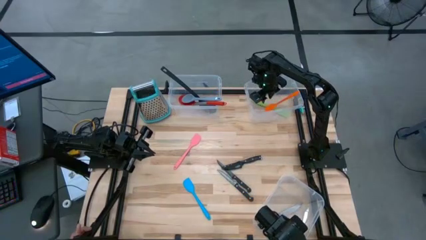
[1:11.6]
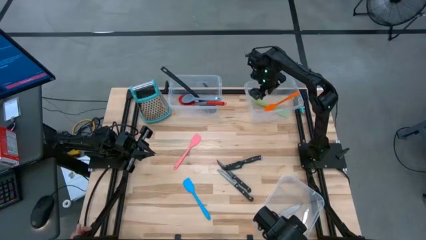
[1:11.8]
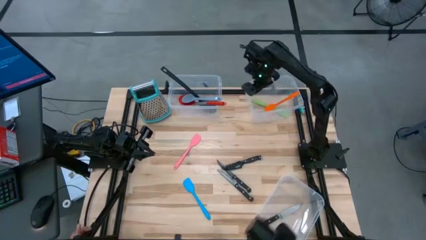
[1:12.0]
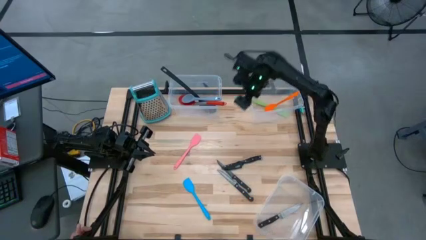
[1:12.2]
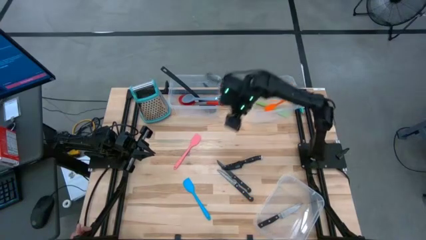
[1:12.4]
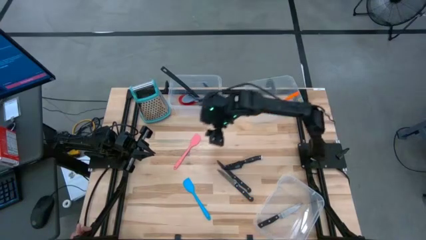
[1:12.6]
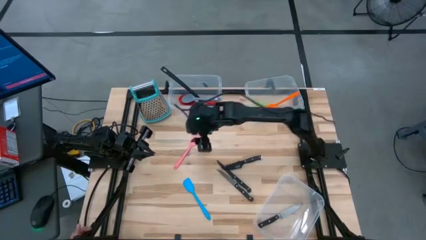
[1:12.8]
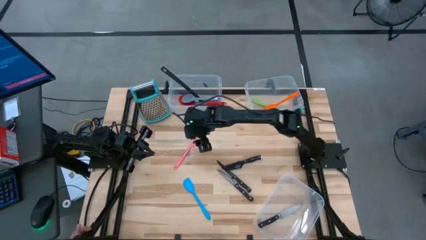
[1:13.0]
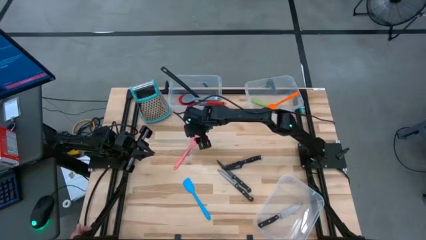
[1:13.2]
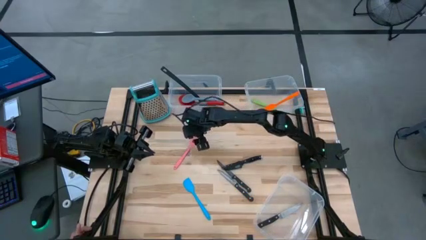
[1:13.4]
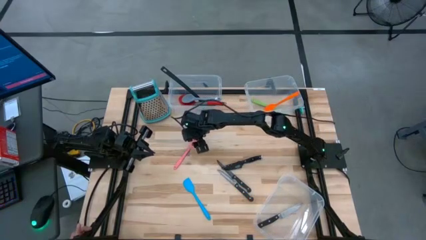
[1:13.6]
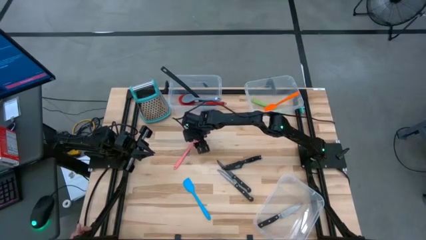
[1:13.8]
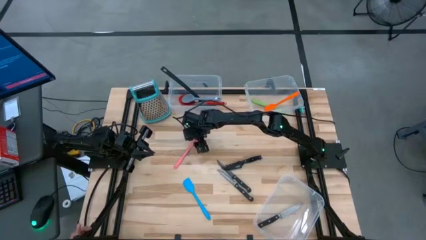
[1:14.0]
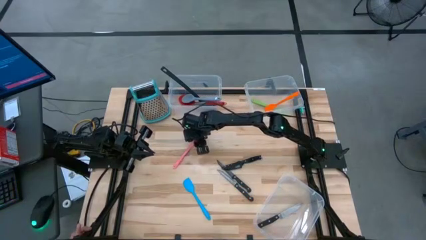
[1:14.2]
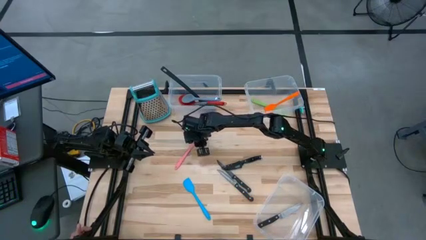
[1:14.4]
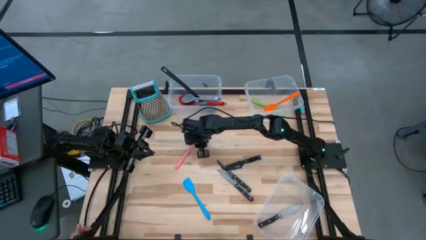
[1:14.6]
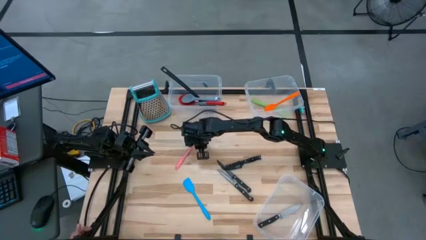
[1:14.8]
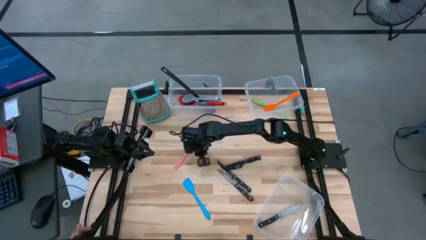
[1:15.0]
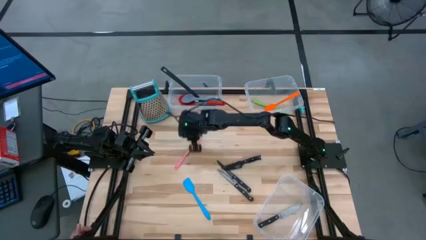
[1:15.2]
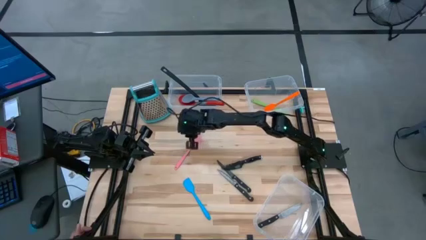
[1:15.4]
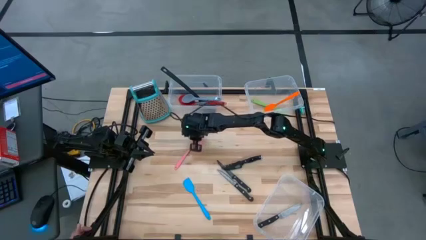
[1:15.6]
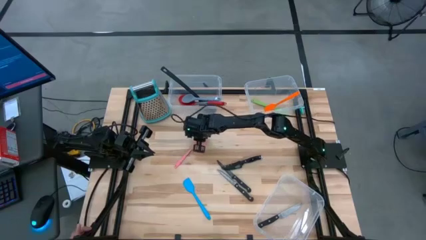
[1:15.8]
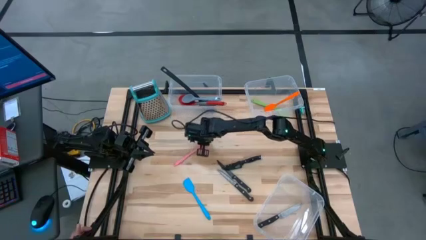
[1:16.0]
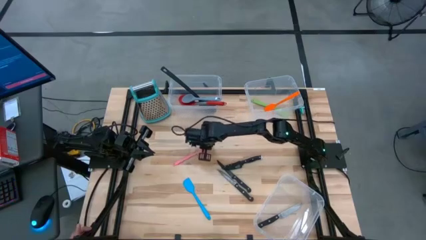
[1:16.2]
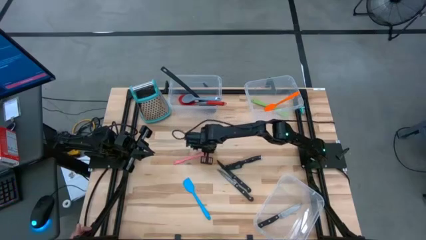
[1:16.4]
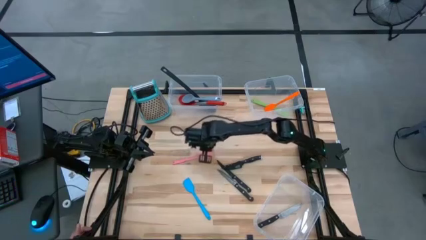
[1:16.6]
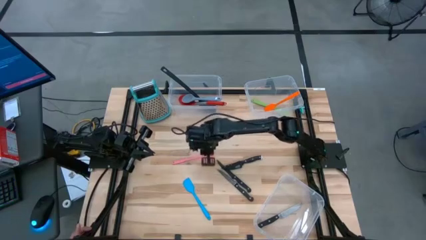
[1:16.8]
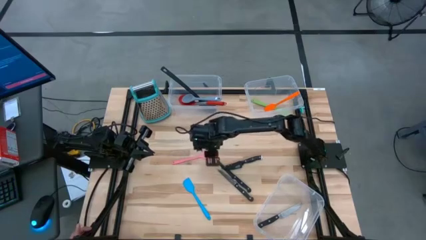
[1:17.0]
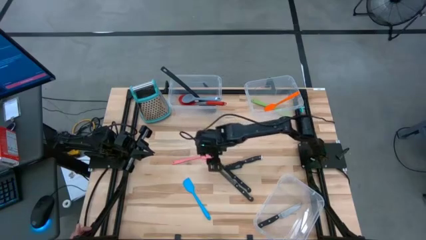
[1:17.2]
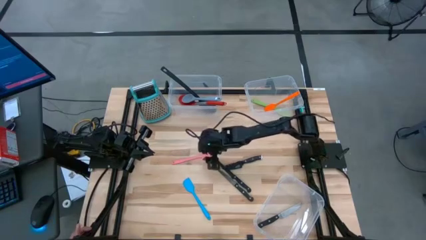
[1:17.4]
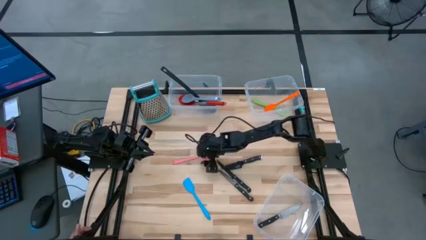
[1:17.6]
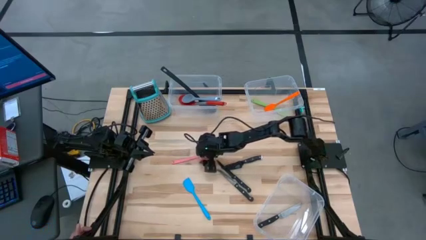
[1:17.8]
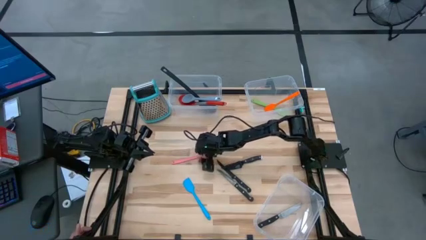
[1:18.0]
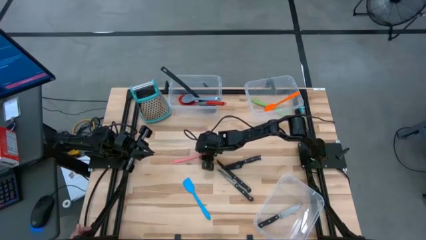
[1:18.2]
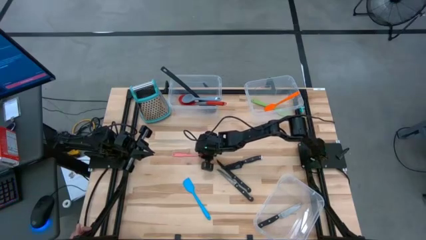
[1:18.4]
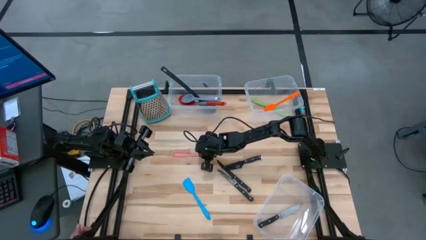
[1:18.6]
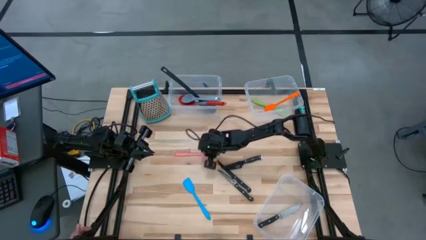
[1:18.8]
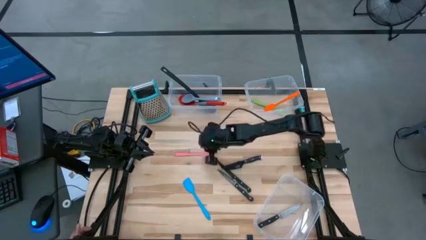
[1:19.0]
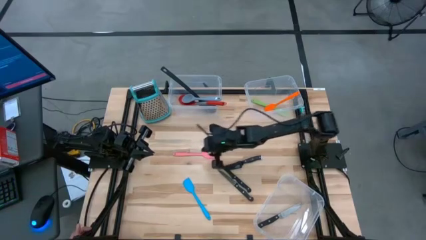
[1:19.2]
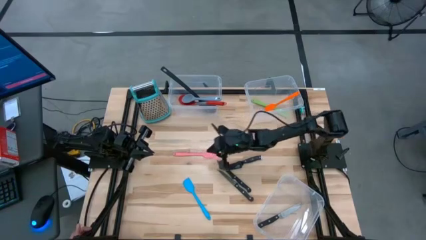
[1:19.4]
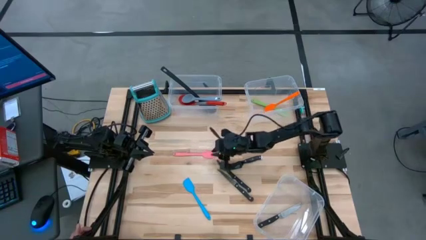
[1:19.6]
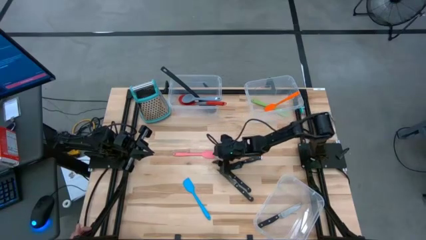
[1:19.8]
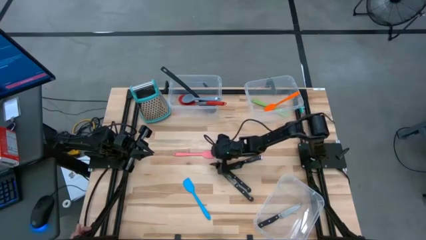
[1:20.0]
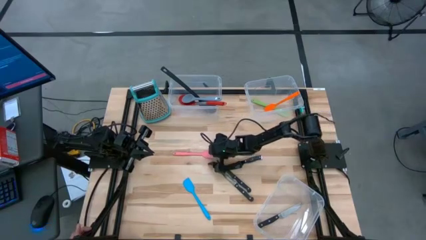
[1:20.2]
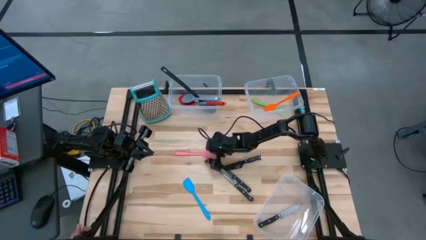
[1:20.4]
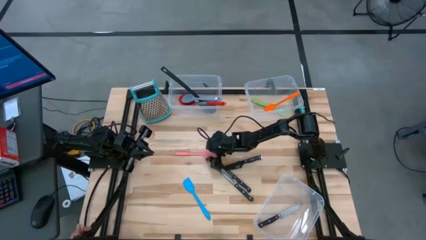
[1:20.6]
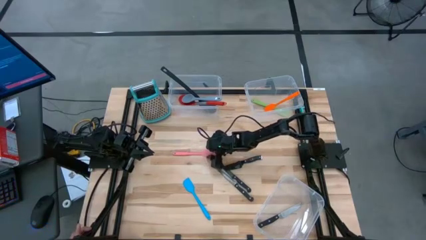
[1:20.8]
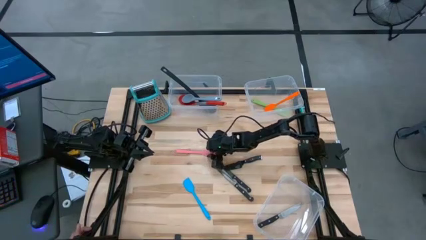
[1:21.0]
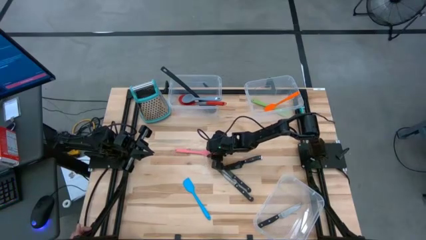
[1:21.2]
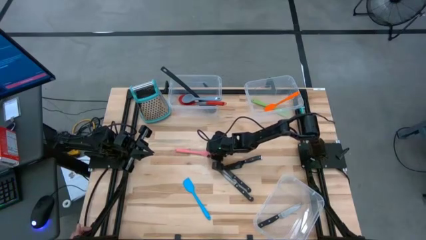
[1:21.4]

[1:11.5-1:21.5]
Task: Pick & Place Kitchen Items
Put the top pink spatula into the top right transparent bin

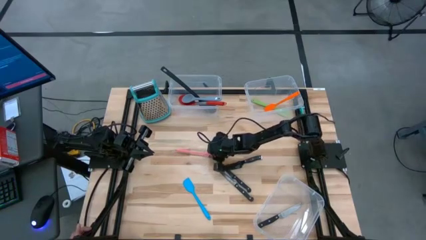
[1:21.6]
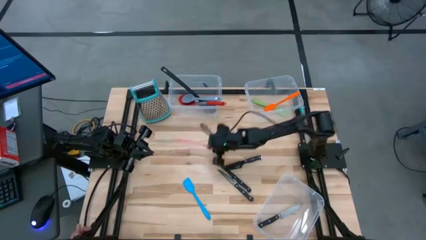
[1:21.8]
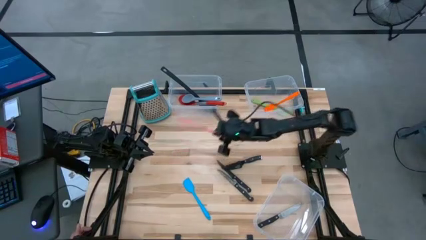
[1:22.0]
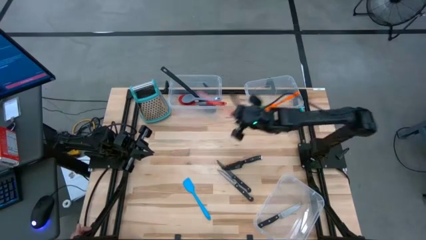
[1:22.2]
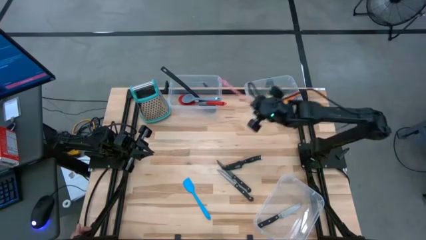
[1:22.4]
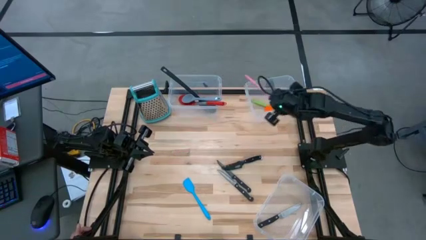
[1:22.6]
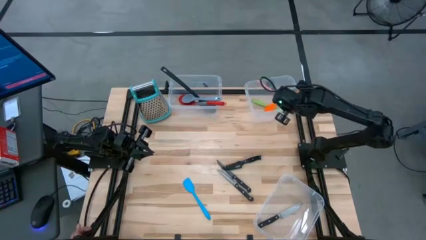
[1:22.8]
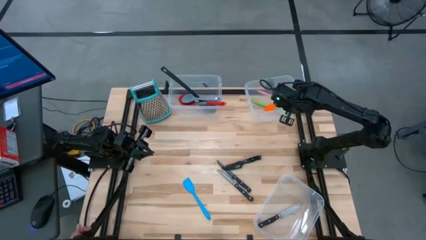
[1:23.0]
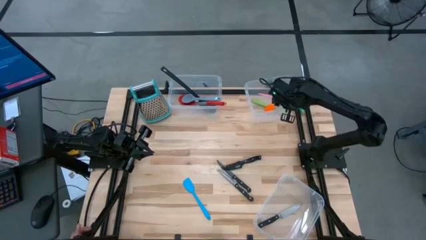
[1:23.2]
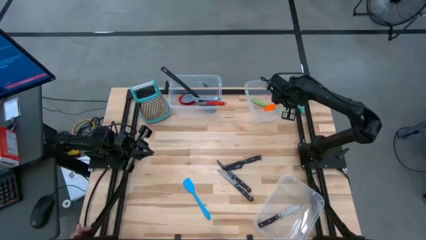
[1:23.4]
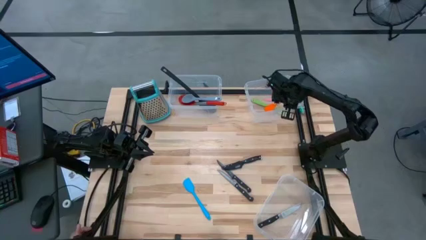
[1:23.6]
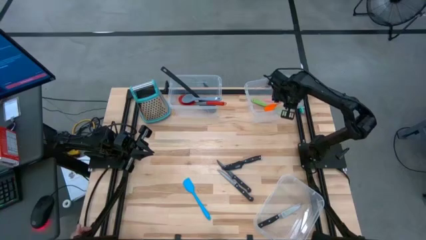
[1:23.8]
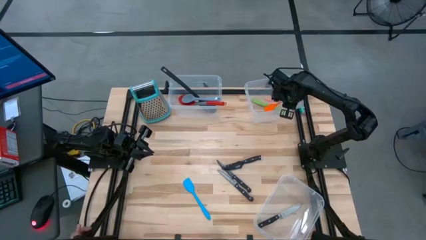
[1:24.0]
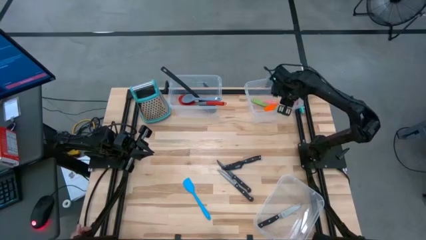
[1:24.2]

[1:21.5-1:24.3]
Put the top pink spatula into the top right transparent bin
